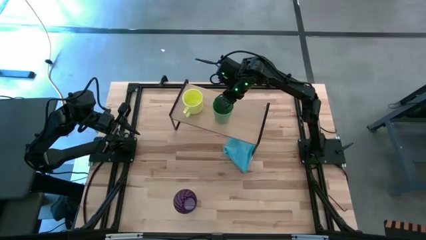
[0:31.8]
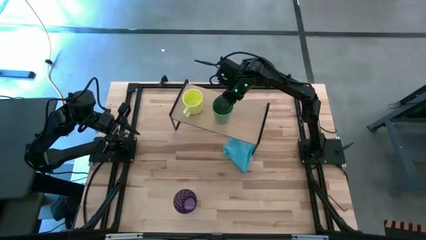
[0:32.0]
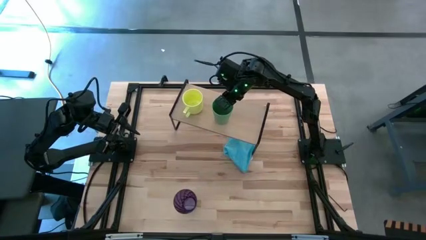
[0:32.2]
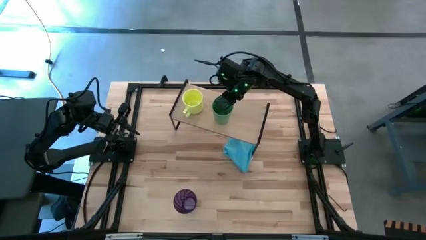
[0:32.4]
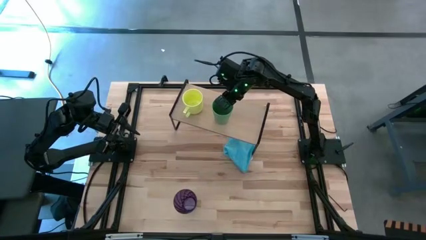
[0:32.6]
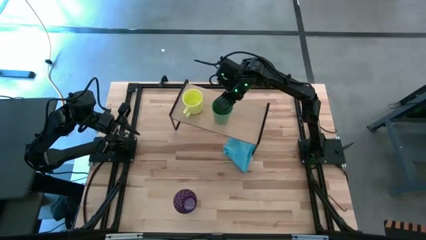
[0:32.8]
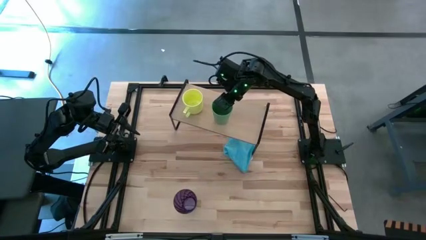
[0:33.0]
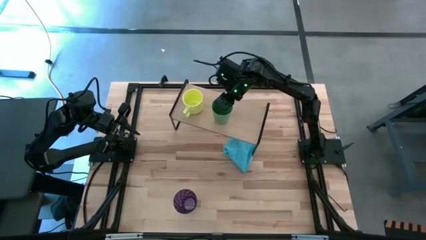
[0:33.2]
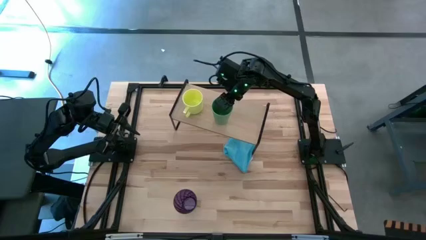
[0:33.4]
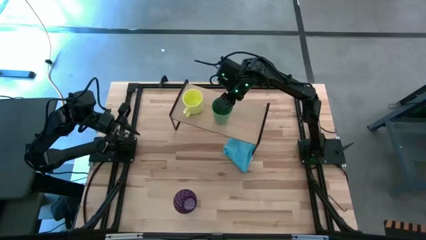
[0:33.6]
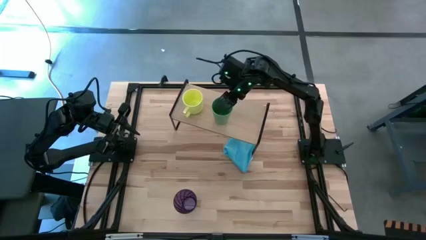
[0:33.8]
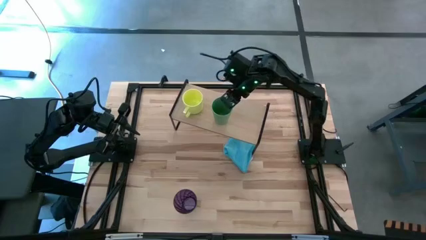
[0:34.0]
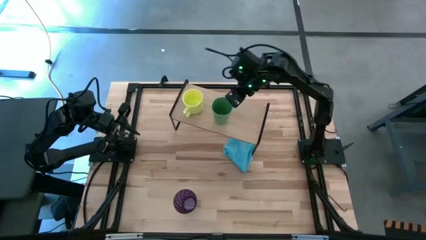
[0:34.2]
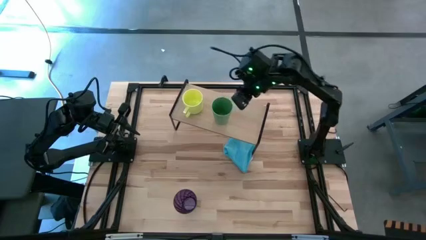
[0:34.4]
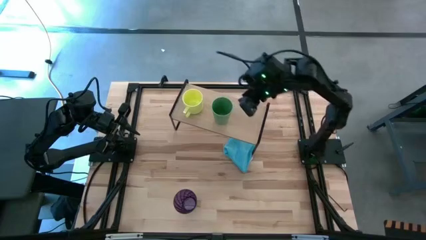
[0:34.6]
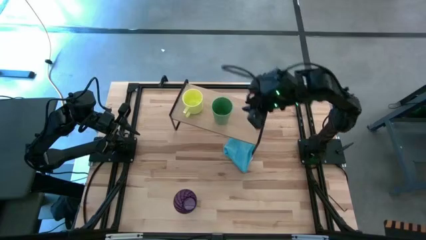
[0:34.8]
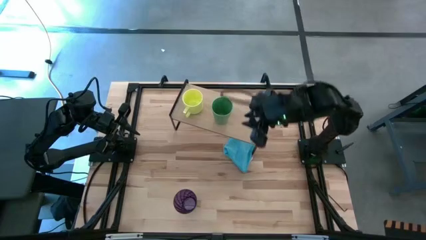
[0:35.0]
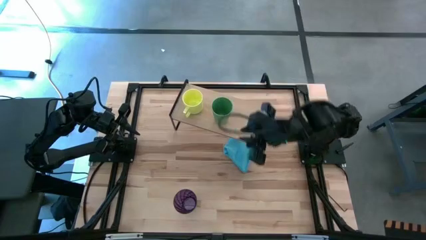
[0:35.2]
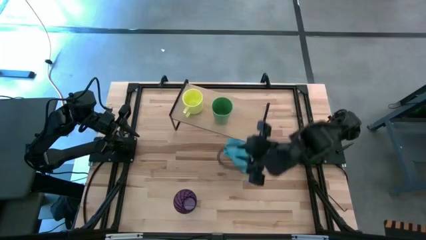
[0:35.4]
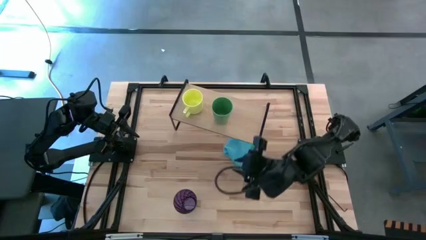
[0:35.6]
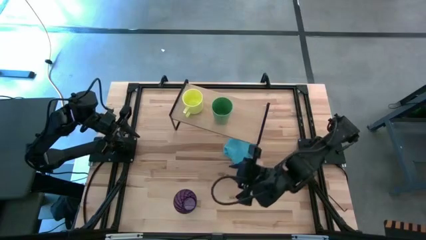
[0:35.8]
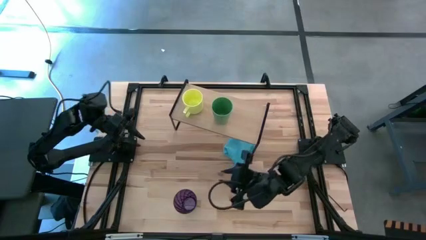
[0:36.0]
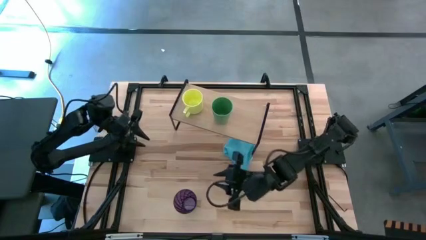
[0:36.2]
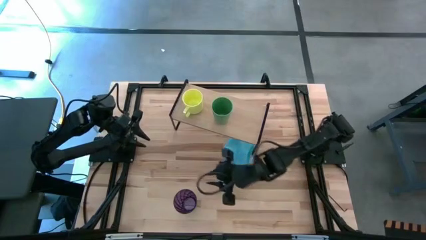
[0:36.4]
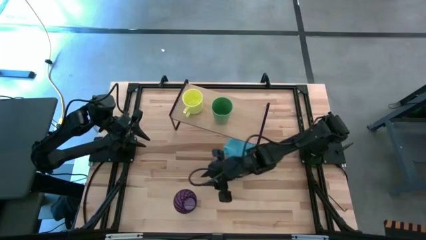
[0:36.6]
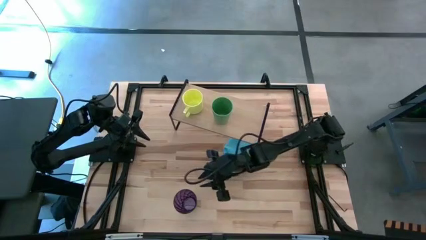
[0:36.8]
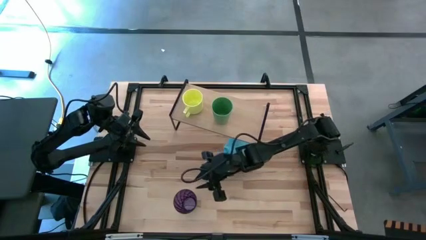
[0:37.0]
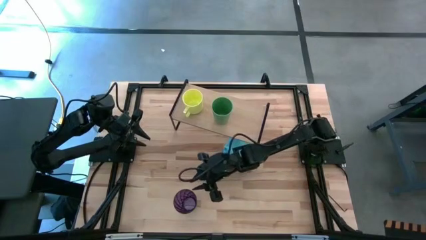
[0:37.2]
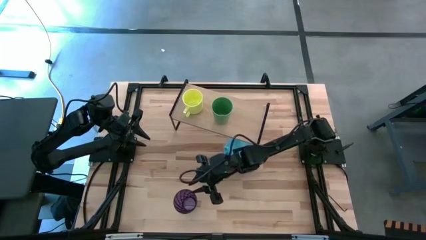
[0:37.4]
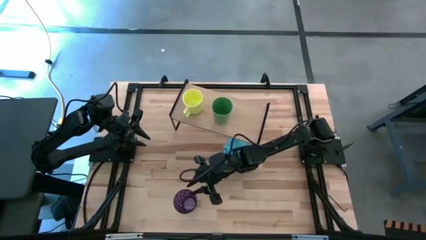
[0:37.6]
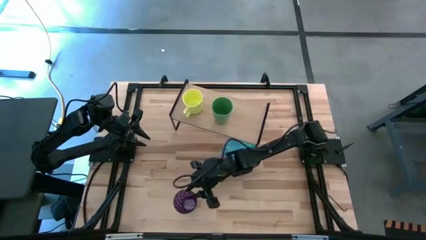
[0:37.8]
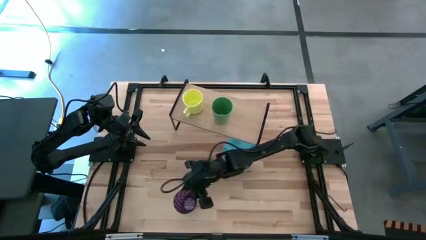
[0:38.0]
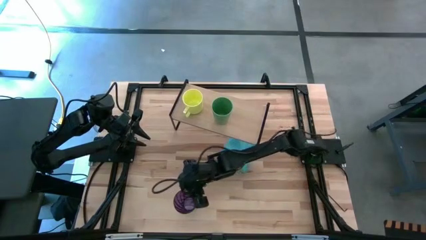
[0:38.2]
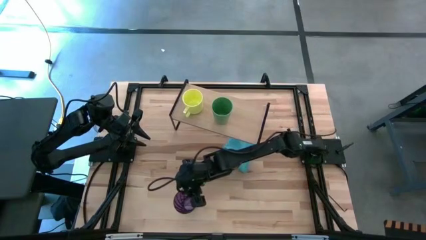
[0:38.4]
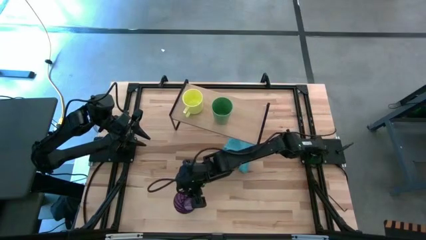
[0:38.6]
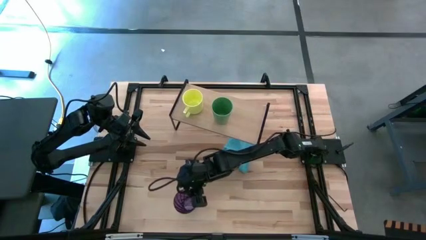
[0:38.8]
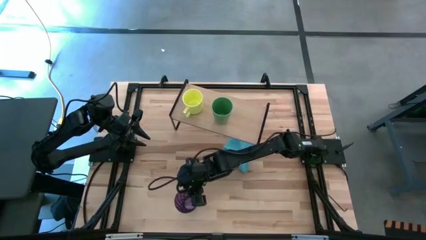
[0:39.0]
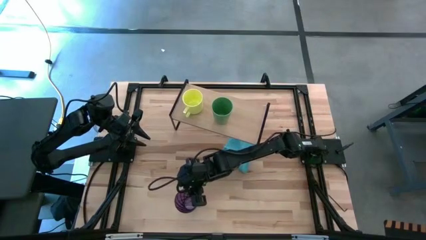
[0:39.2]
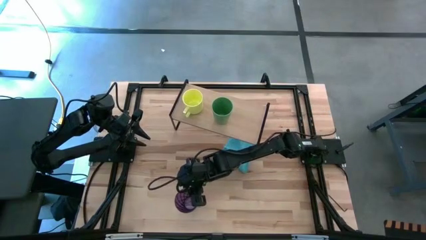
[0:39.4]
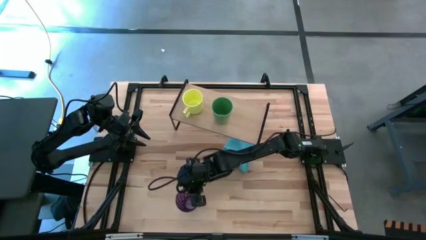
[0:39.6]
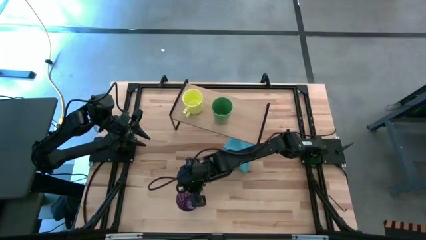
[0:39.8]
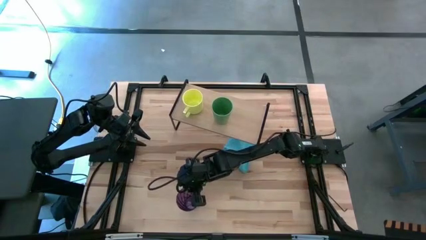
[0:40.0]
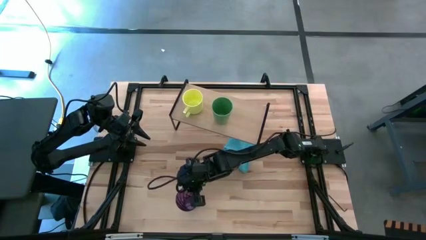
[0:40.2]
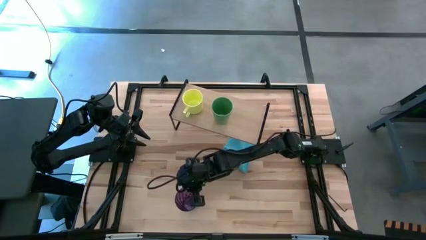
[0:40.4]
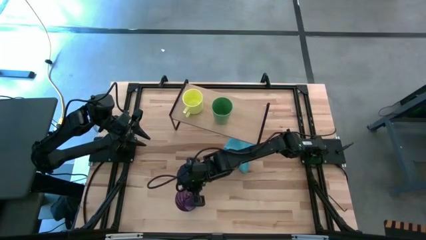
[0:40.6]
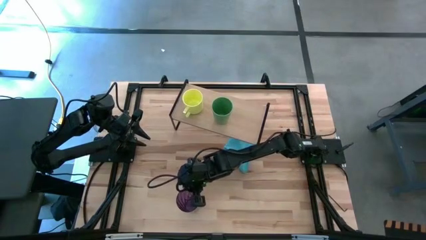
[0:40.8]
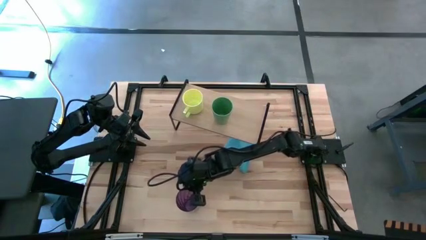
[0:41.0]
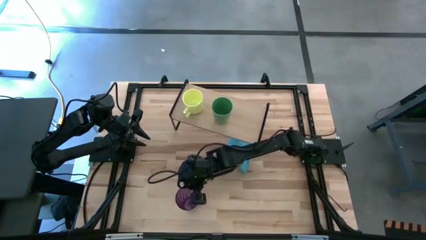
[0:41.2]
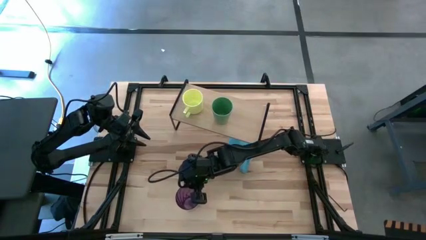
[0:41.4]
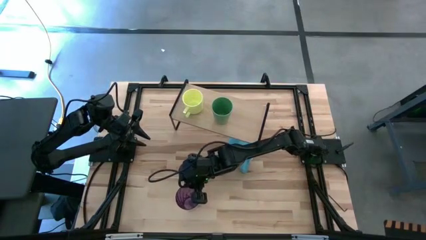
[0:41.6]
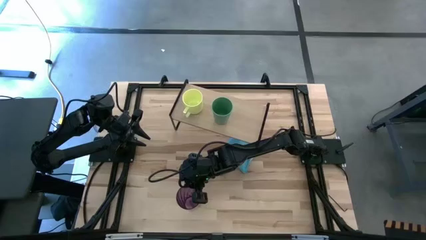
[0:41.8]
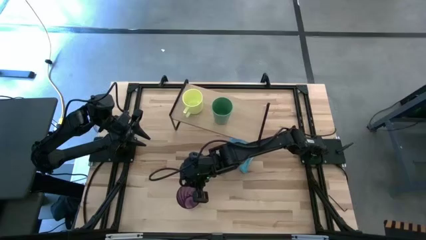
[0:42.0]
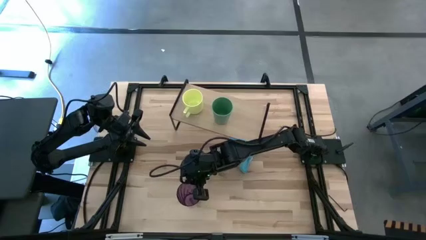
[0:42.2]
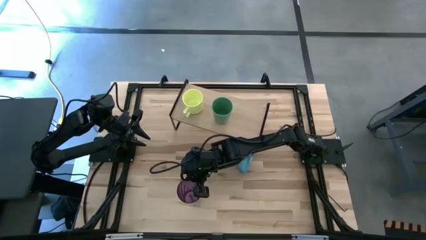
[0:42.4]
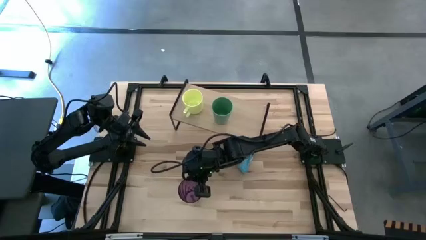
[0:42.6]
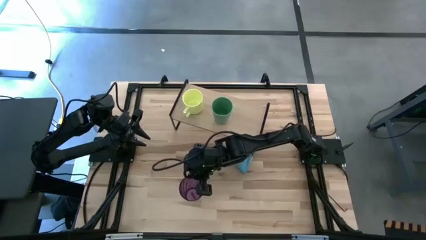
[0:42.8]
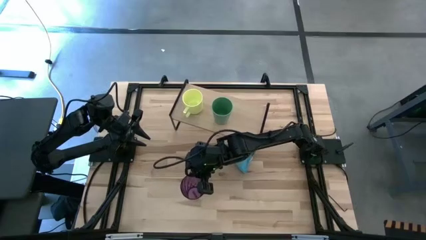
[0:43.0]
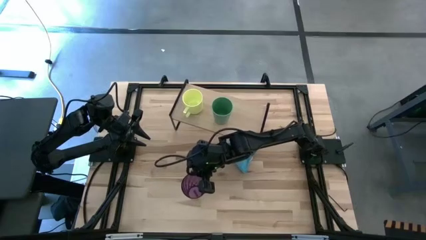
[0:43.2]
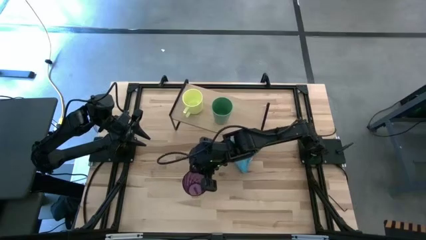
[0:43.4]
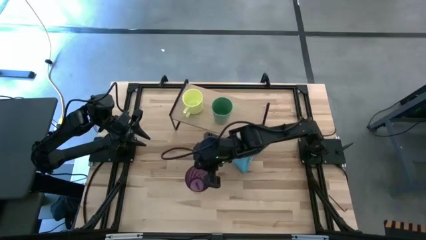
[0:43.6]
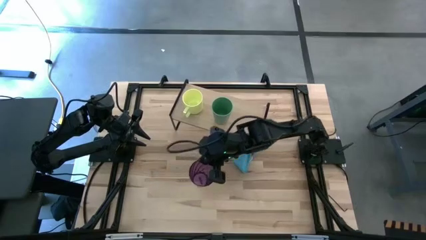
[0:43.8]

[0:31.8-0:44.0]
Task: Stack small to large cups/mugs on shelf
Put the violet cup on the shelf

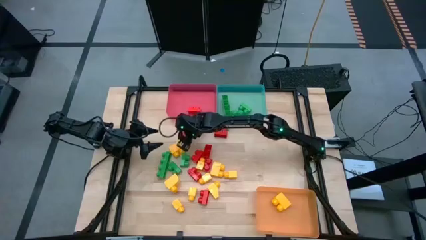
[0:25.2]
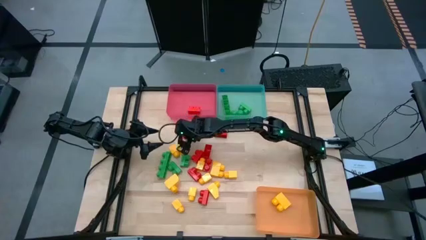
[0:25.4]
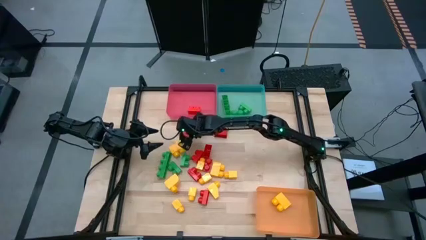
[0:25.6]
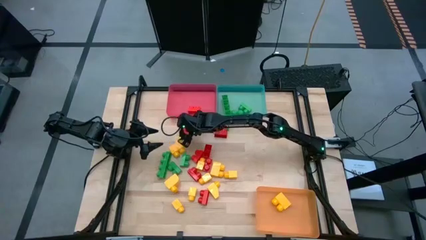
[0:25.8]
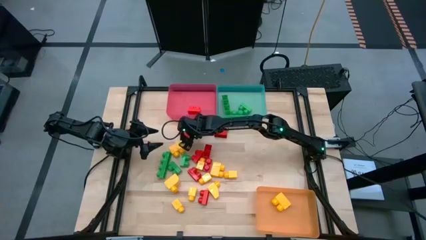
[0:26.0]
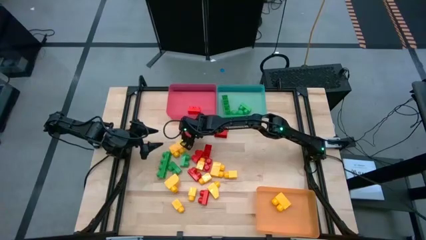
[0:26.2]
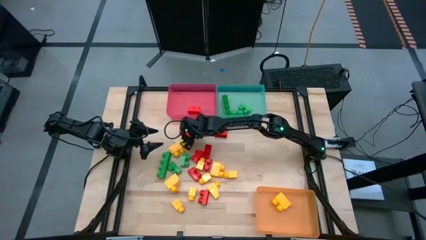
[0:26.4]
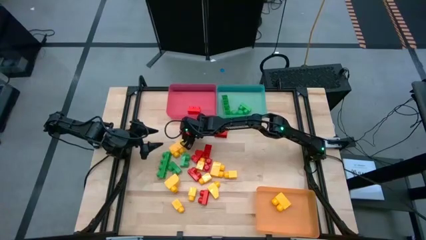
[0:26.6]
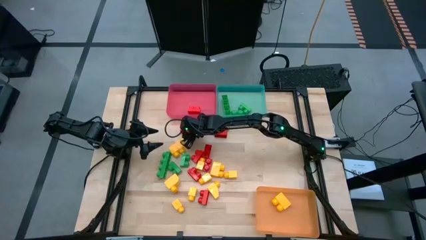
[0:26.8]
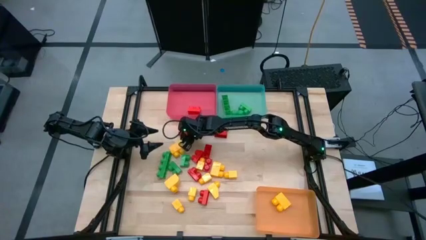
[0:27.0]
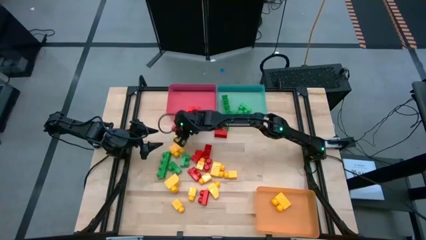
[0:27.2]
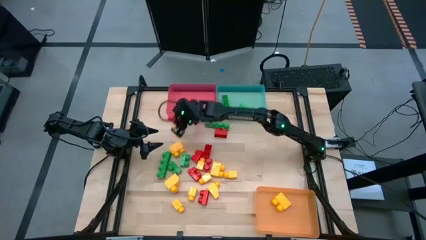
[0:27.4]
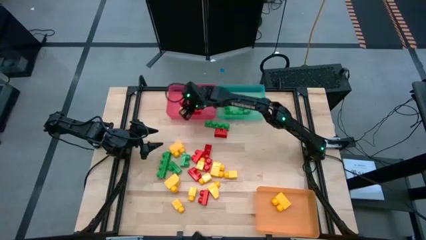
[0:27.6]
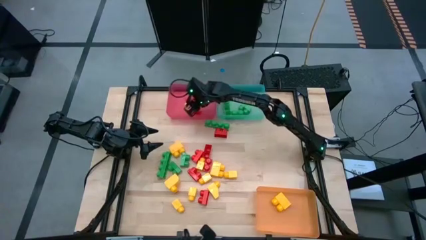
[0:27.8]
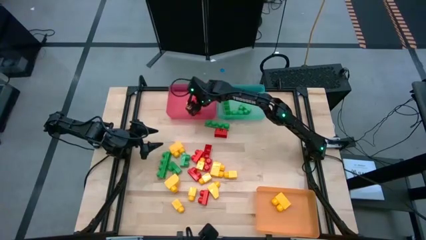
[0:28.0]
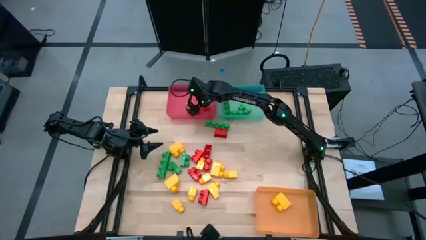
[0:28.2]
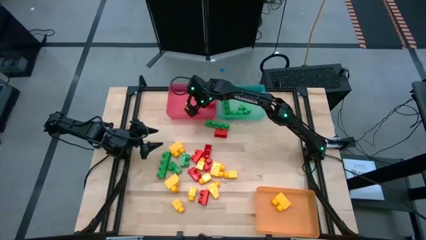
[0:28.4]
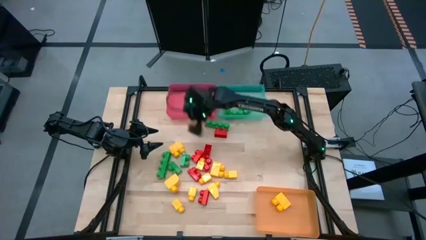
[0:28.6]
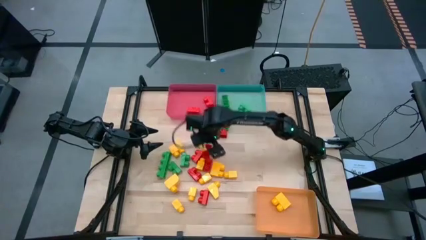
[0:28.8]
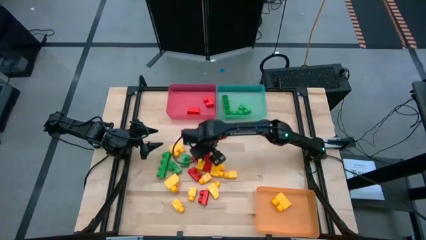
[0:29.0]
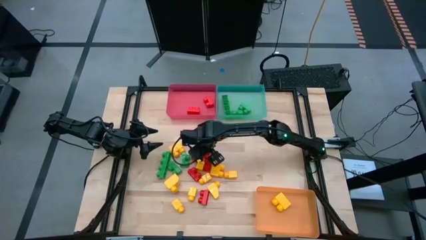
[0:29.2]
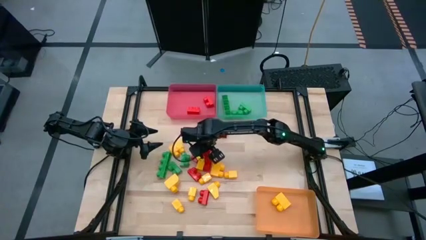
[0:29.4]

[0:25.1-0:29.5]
Task: Sort blocks
Put the red game piece into the red bin

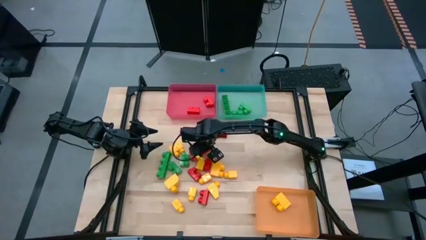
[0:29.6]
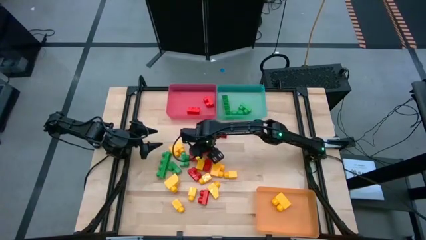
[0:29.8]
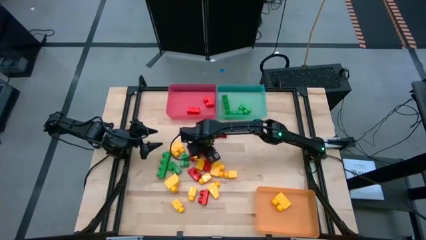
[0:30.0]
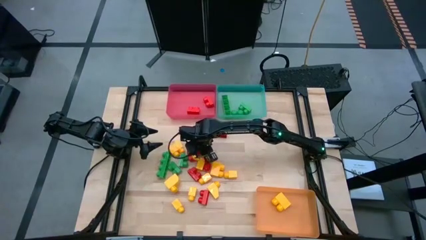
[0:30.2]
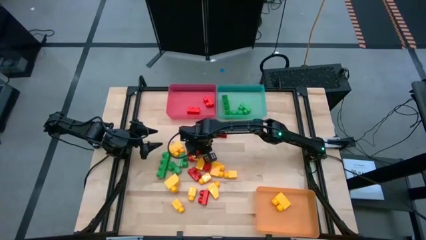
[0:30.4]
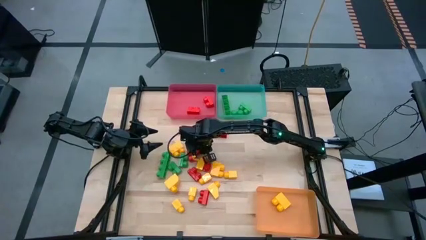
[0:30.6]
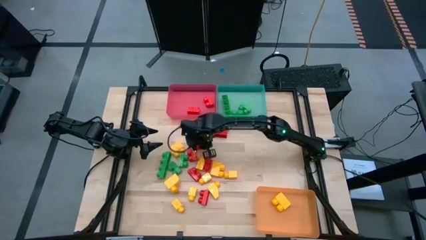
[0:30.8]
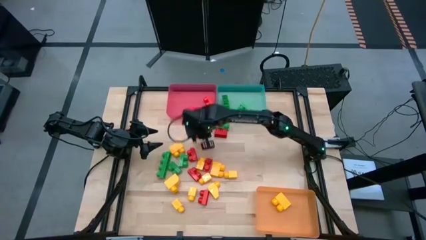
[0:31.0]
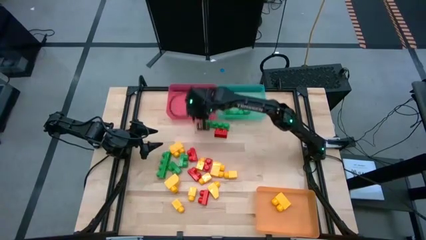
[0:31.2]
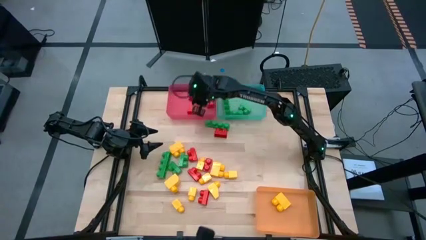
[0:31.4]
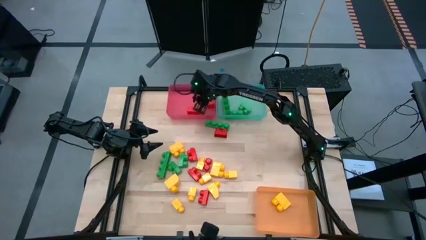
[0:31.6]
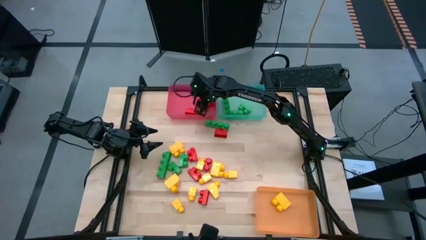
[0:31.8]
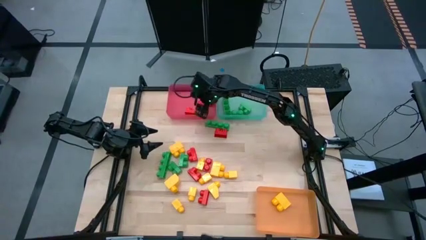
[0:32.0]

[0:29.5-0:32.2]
Put the red game piece into the red bin
